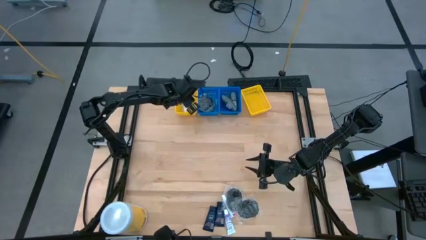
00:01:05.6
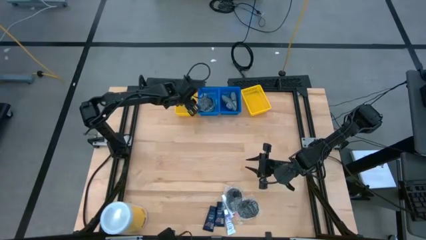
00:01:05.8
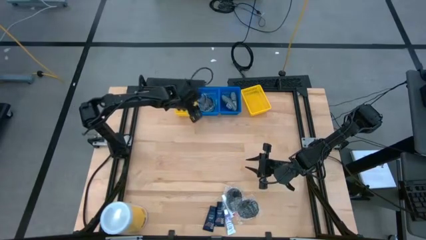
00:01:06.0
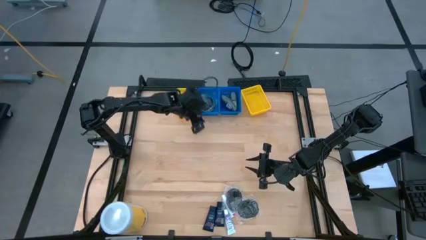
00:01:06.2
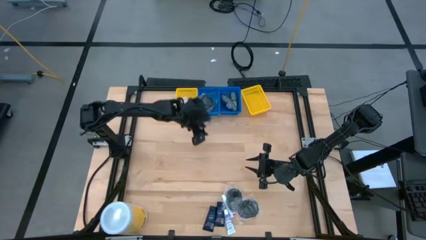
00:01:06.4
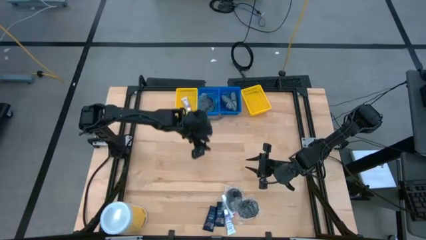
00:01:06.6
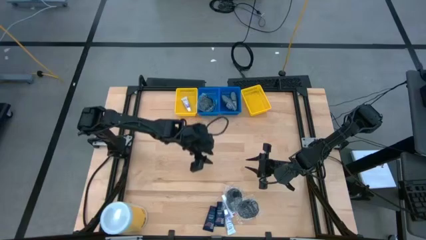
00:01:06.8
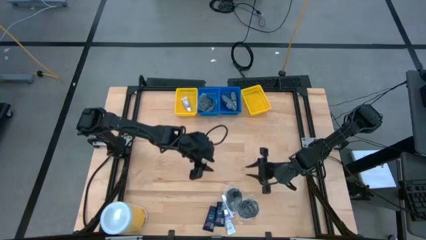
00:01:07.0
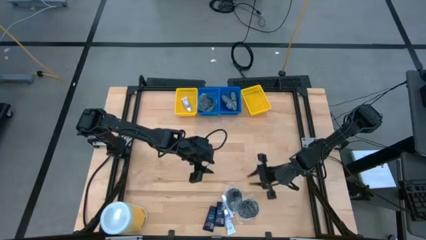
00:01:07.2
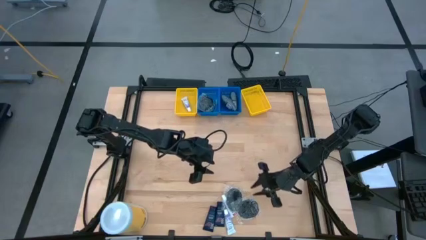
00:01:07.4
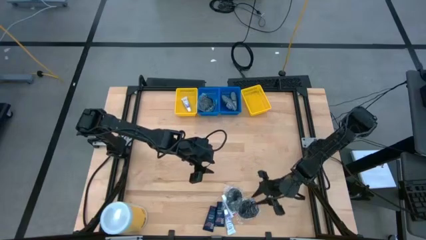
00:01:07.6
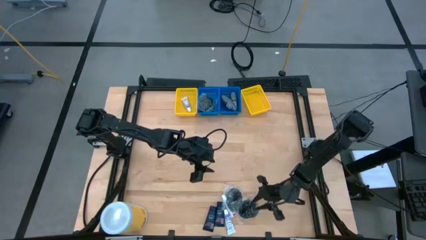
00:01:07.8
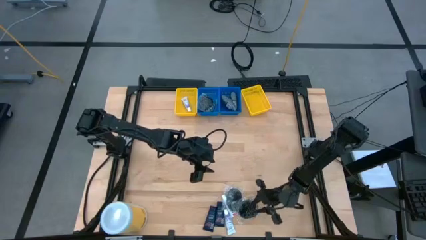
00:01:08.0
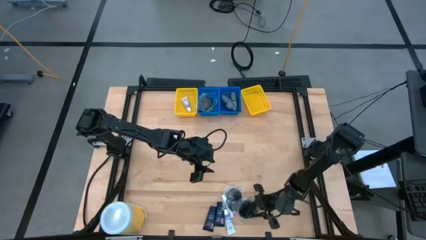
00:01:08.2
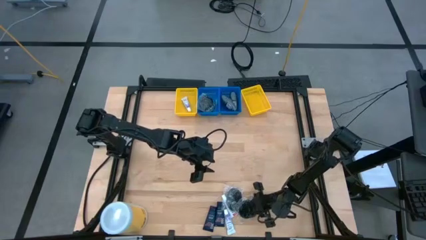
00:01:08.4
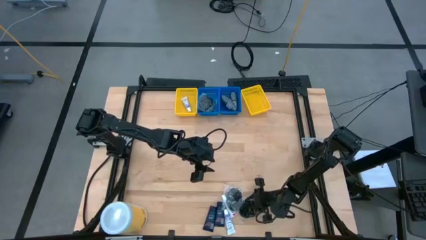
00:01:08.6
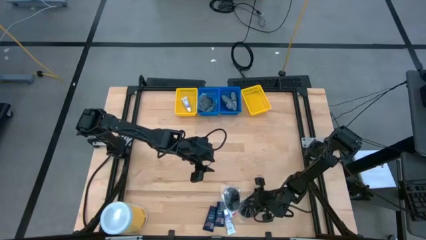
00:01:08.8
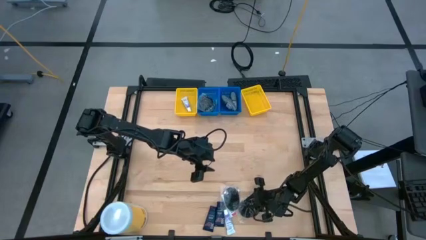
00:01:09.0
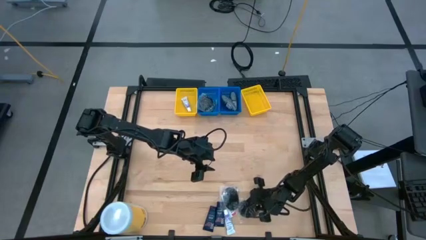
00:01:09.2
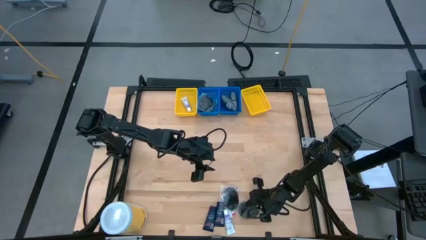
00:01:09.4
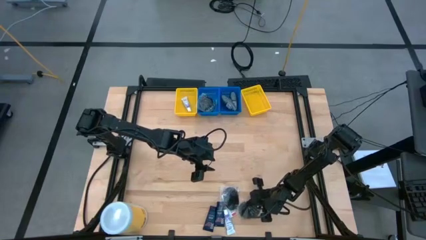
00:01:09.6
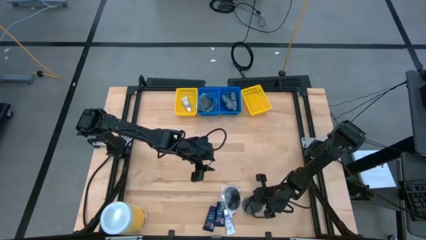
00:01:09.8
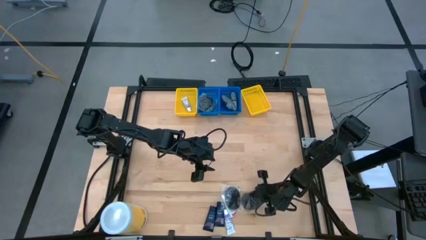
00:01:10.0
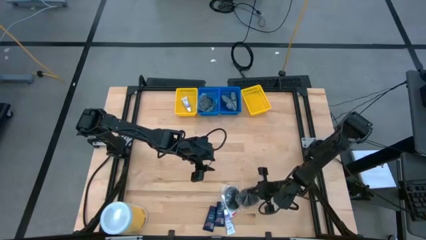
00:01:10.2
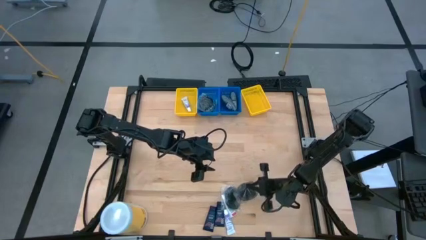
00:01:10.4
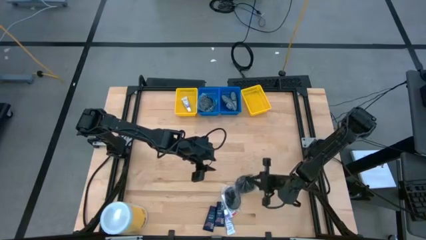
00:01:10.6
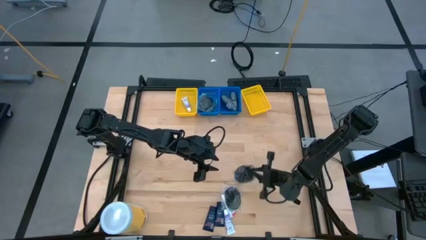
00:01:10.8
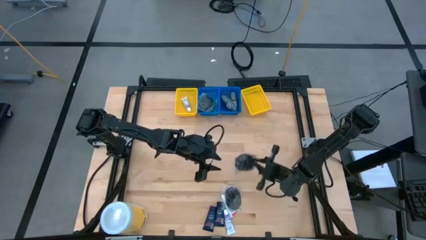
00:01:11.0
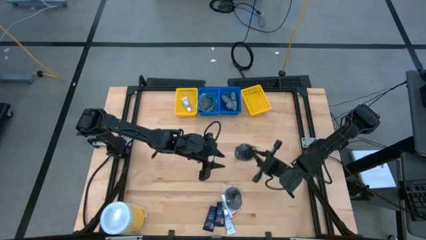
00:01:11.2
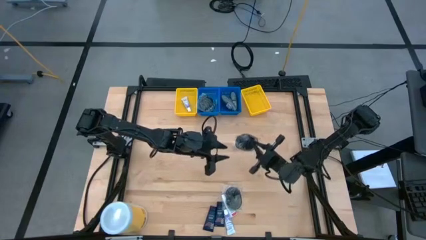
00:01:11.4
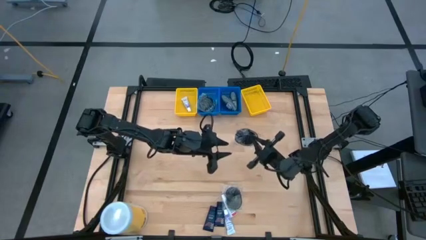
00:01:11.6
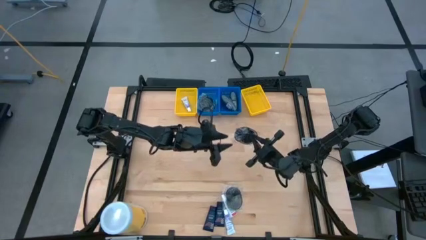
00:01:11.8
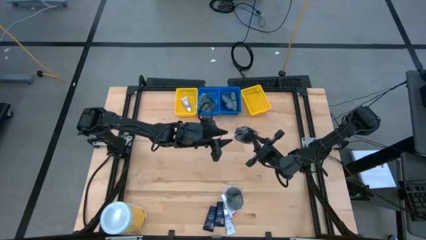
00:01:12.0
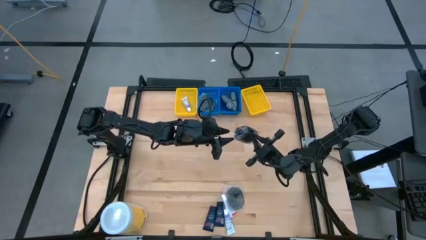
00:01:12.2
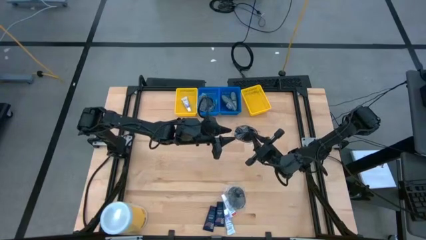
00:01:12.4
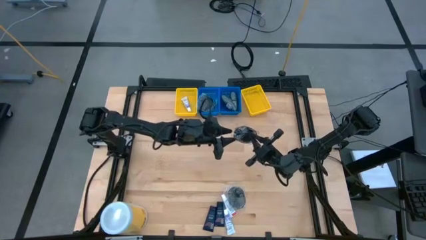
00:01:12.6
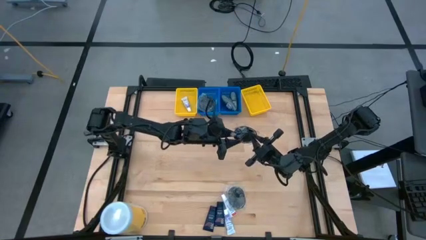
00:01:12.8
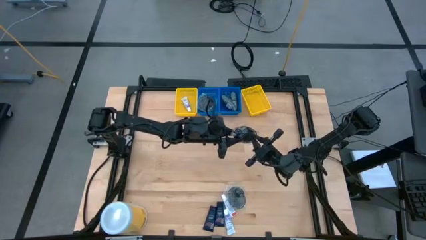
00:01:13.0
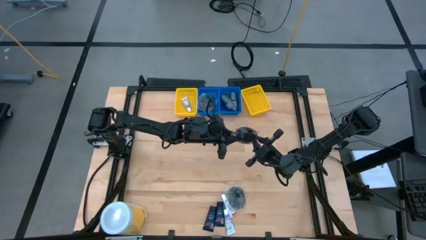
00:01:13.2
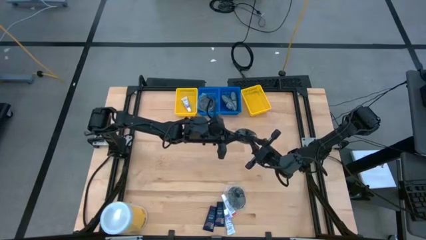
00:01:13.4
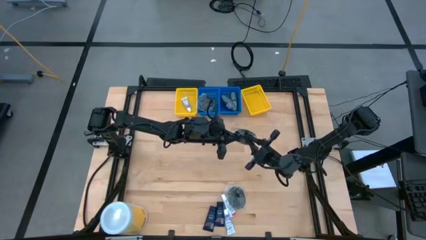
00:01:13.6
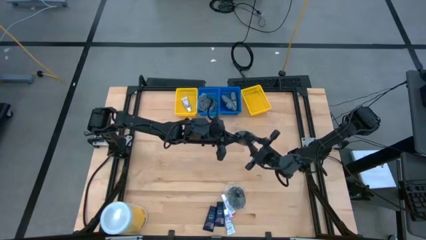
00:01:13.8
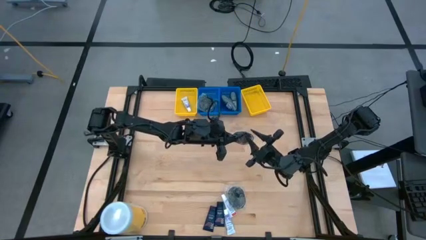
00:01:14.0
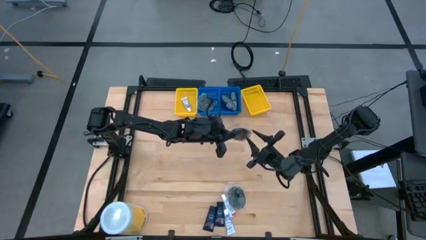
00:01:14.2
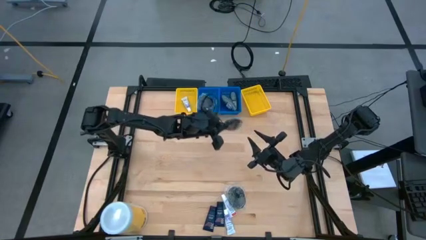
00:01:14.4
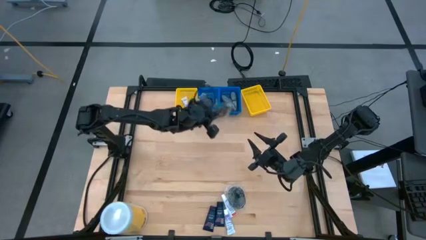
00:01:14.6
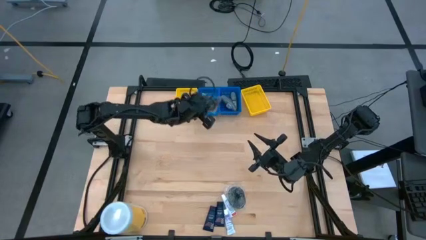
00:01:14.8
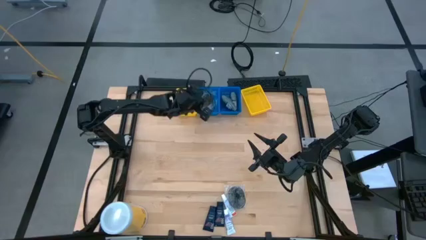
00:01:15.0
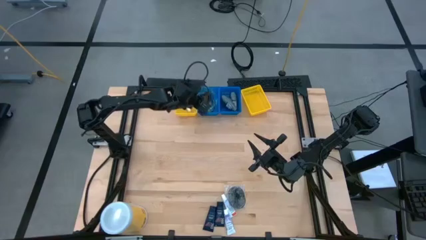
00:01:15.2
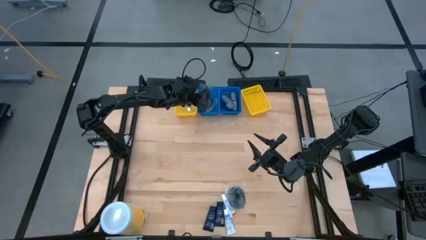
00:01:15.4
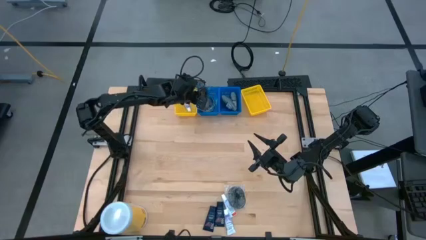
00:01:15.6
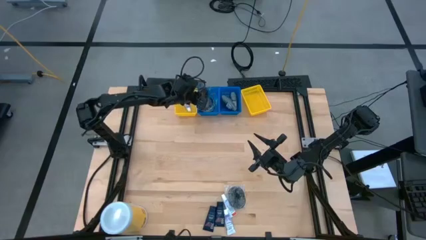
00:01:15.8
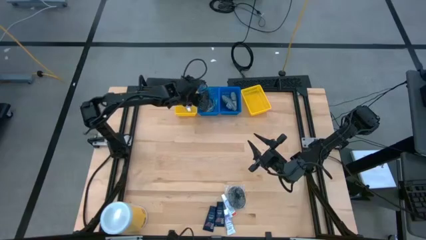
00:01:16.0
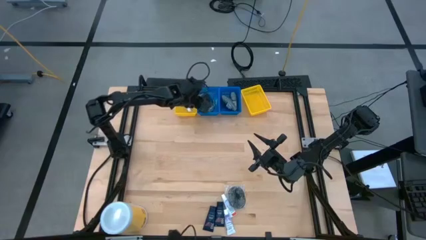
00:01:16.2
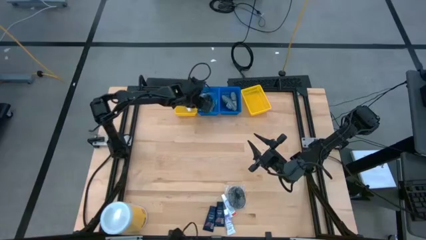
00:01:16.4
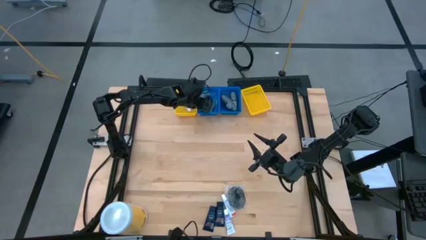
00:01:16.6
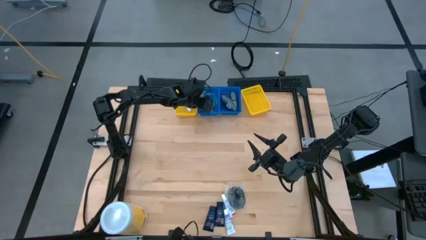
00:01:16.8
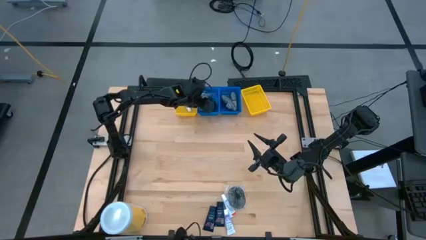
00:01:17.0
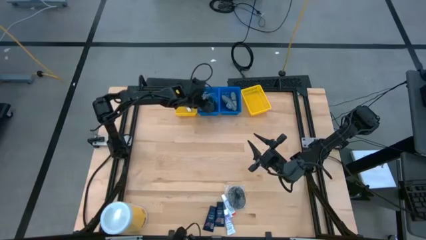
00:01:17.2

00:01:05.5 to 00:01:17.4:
Task: Pick & Place Travel size toiletries
Put the hairbrush into the left blue bin
